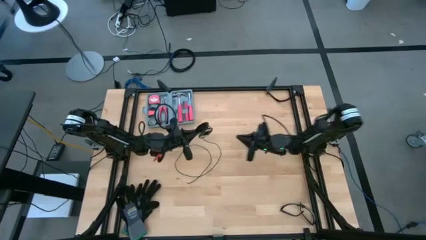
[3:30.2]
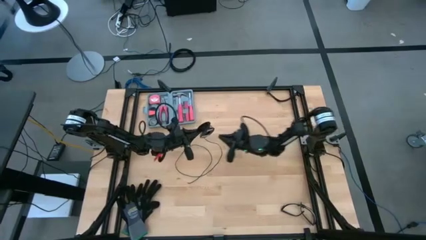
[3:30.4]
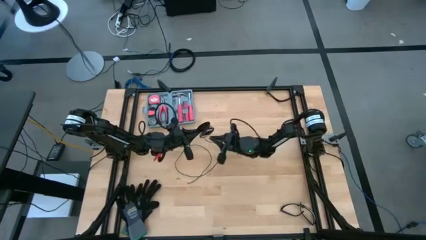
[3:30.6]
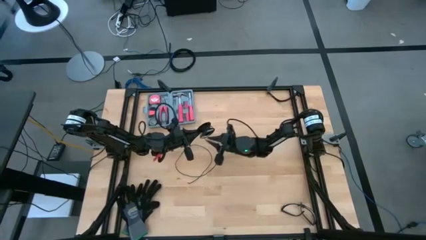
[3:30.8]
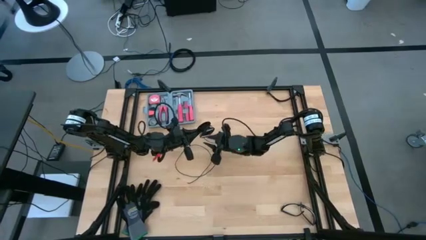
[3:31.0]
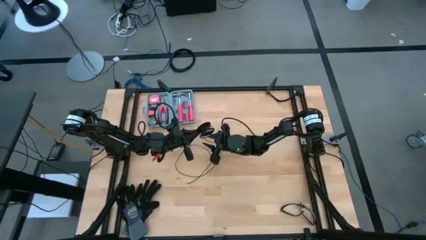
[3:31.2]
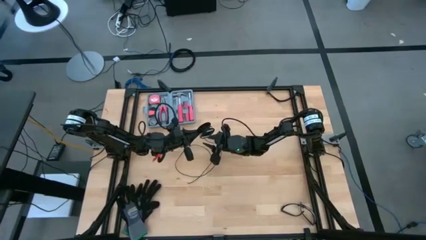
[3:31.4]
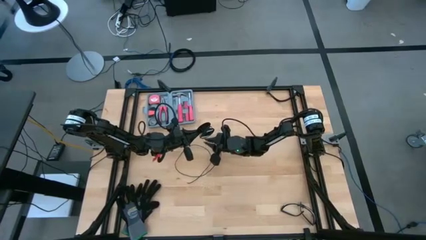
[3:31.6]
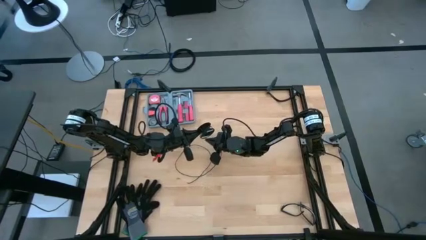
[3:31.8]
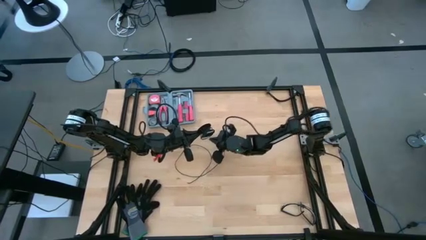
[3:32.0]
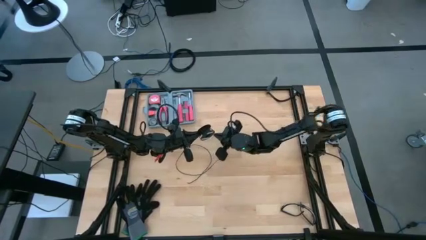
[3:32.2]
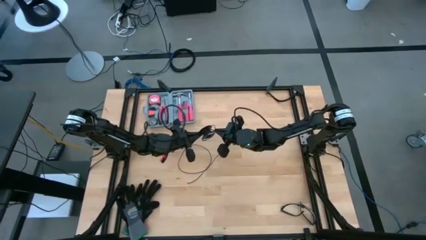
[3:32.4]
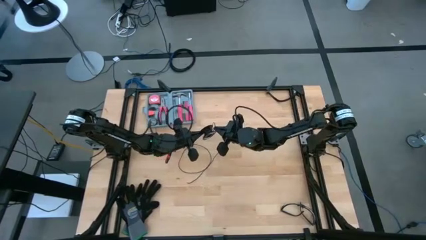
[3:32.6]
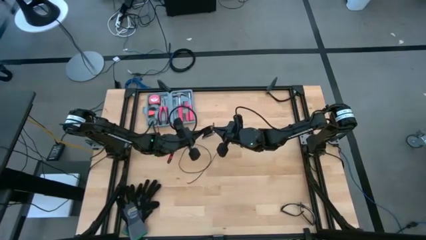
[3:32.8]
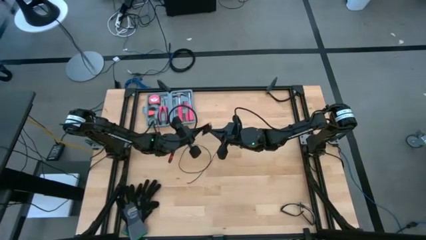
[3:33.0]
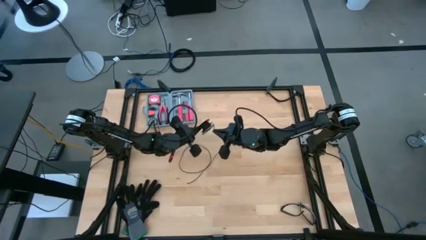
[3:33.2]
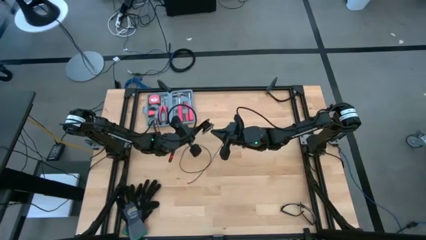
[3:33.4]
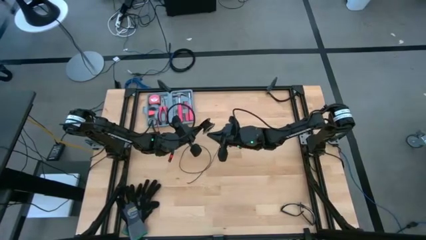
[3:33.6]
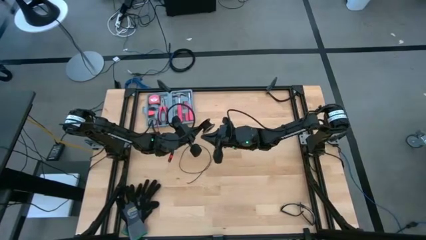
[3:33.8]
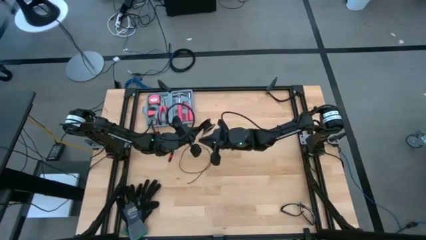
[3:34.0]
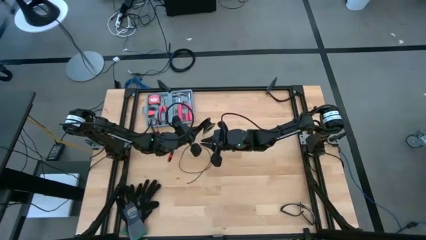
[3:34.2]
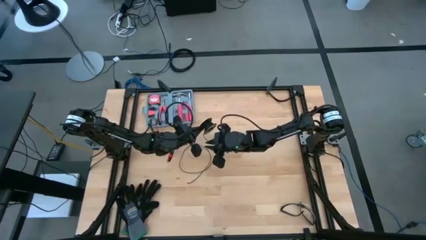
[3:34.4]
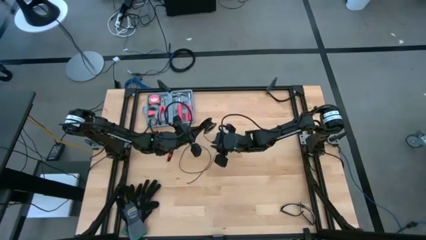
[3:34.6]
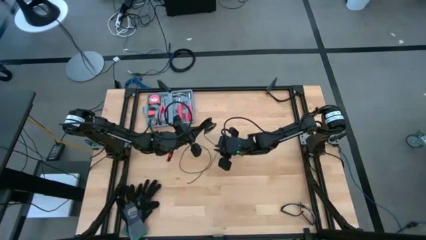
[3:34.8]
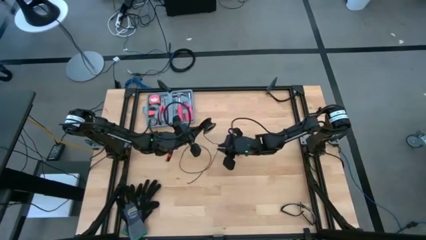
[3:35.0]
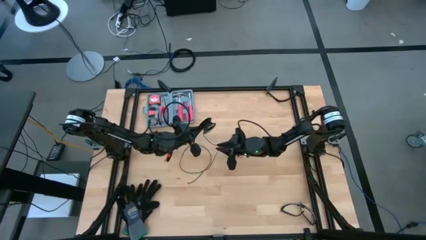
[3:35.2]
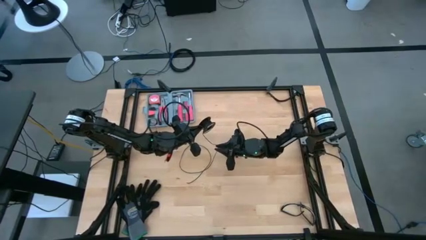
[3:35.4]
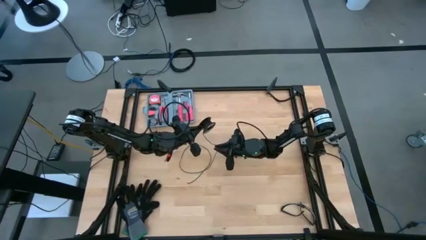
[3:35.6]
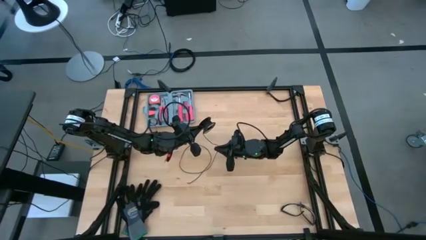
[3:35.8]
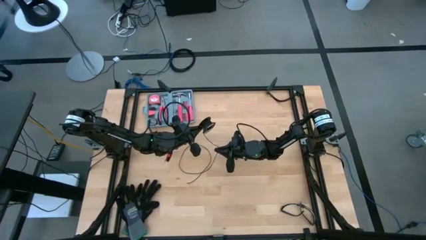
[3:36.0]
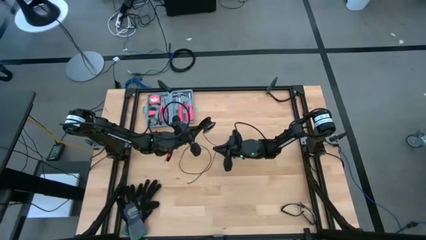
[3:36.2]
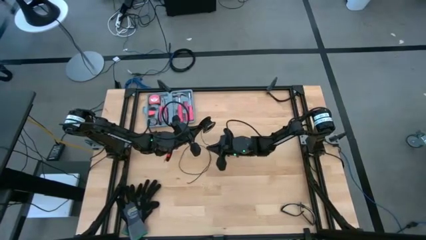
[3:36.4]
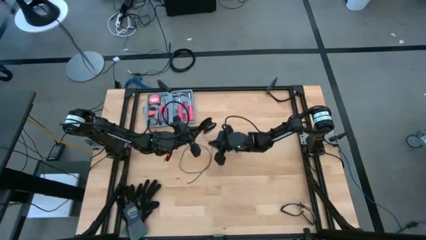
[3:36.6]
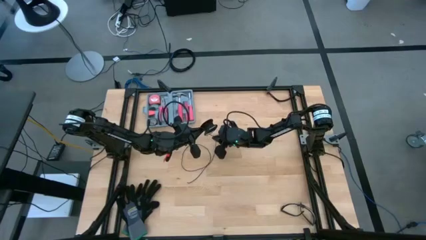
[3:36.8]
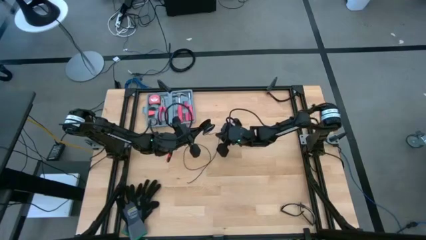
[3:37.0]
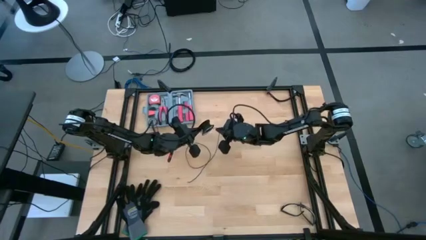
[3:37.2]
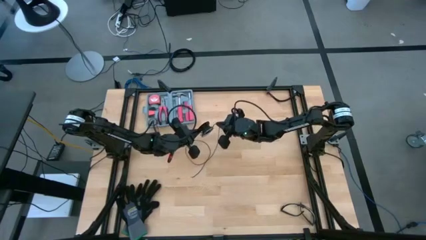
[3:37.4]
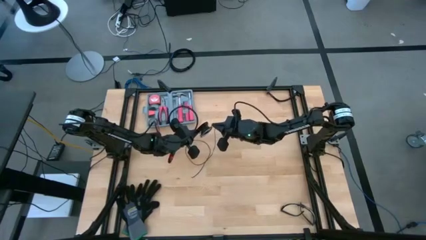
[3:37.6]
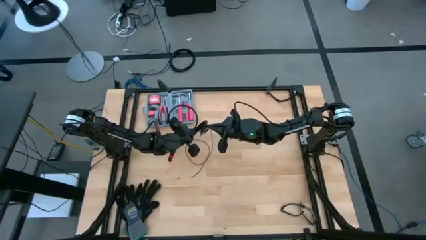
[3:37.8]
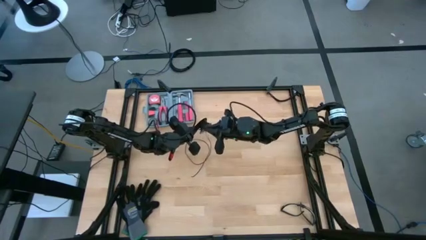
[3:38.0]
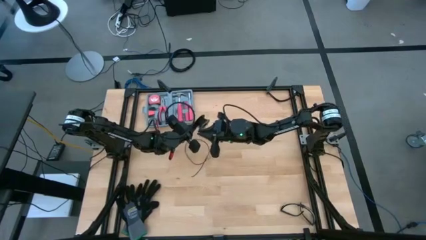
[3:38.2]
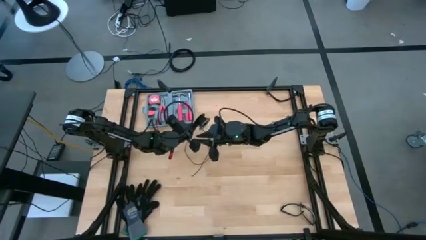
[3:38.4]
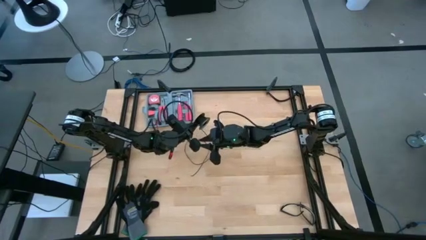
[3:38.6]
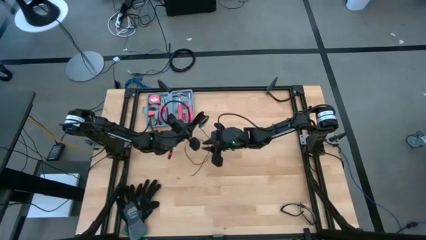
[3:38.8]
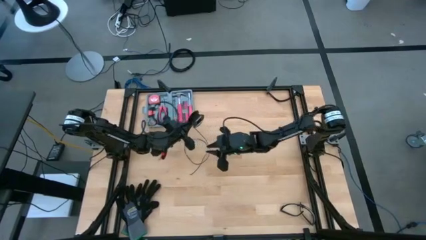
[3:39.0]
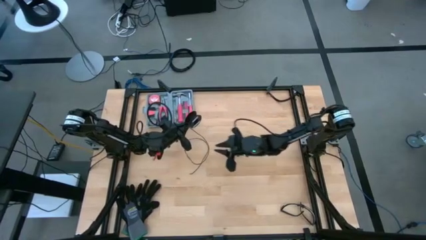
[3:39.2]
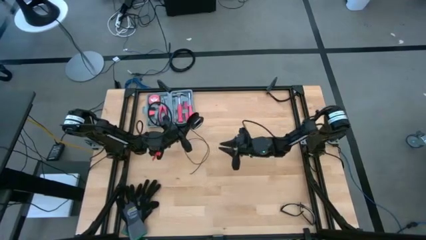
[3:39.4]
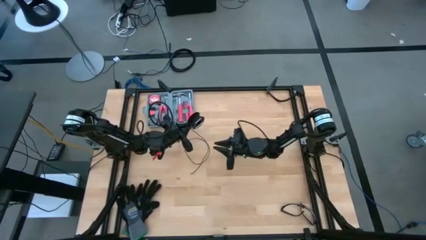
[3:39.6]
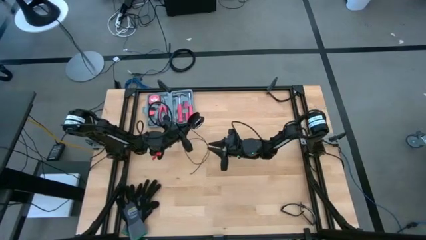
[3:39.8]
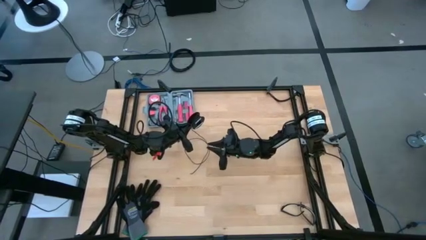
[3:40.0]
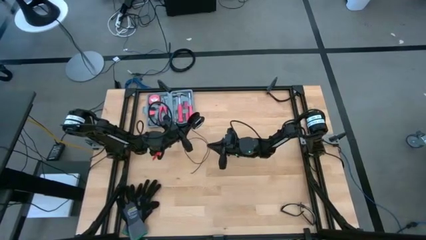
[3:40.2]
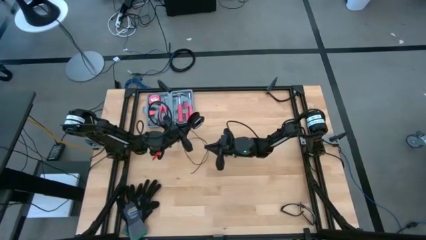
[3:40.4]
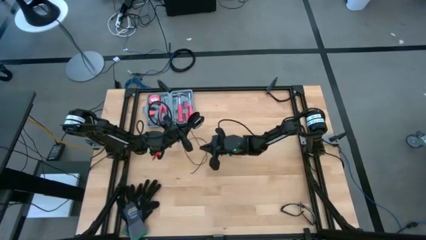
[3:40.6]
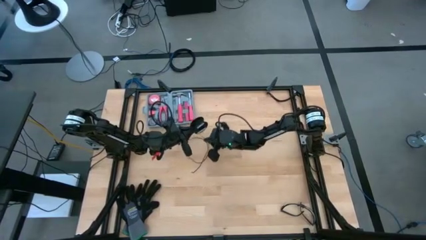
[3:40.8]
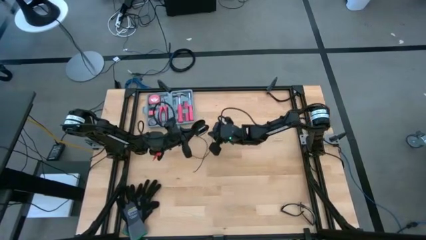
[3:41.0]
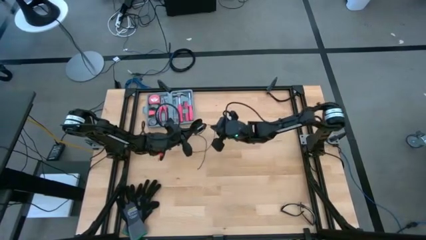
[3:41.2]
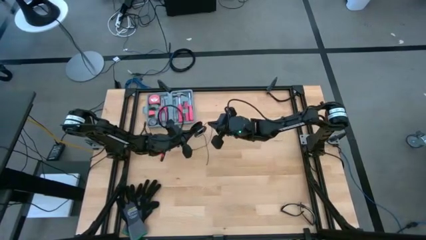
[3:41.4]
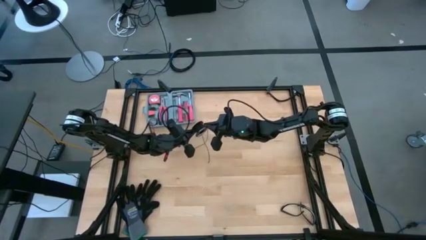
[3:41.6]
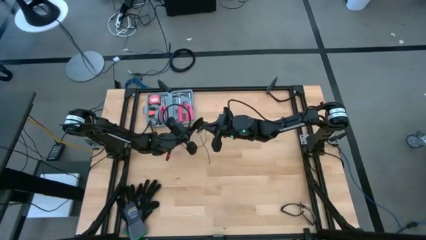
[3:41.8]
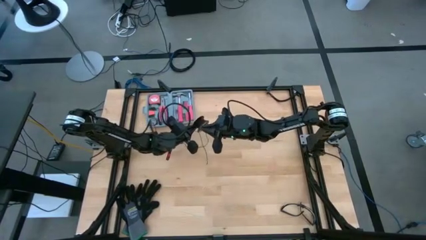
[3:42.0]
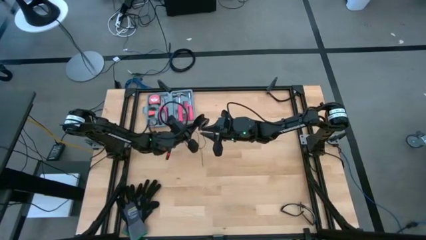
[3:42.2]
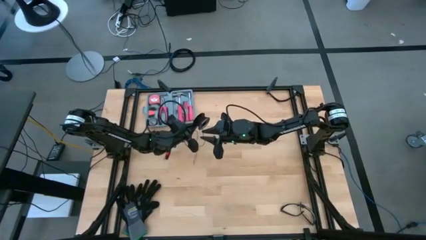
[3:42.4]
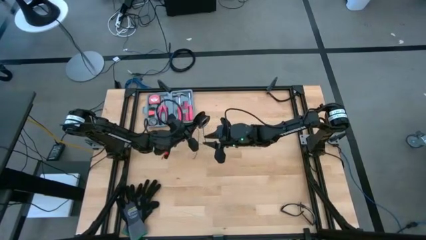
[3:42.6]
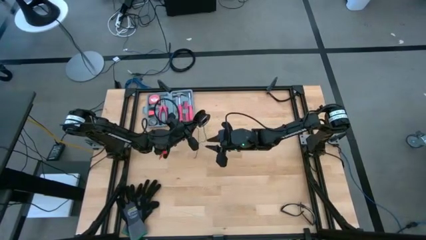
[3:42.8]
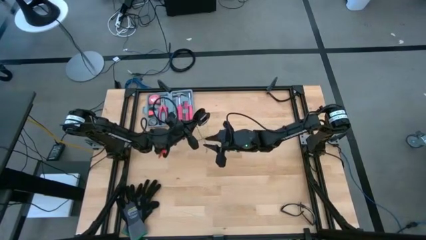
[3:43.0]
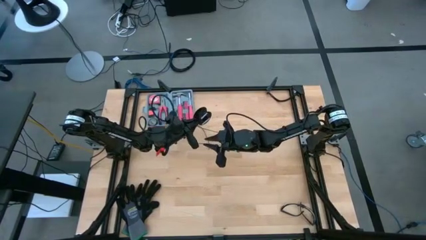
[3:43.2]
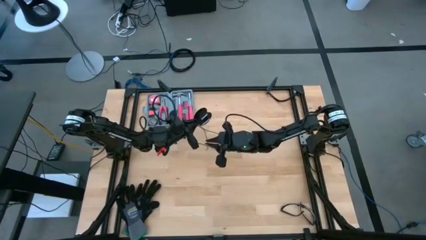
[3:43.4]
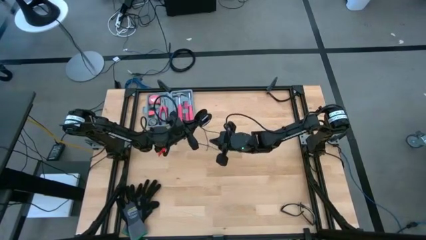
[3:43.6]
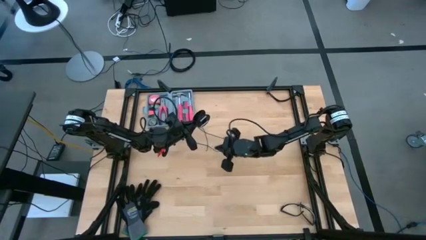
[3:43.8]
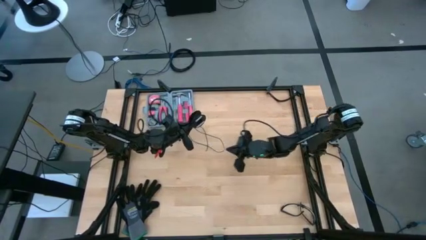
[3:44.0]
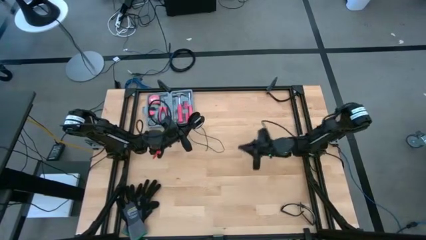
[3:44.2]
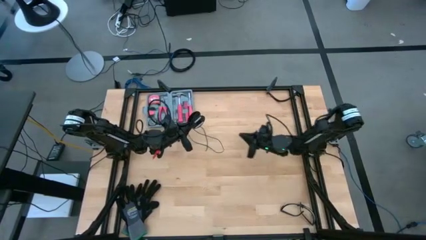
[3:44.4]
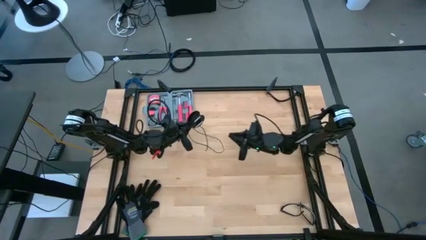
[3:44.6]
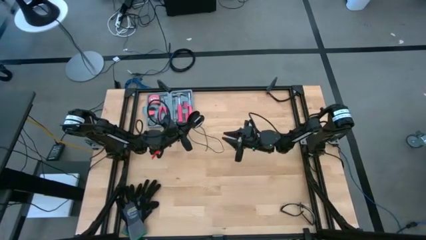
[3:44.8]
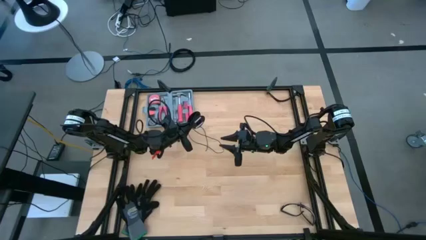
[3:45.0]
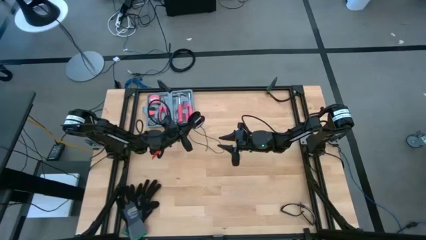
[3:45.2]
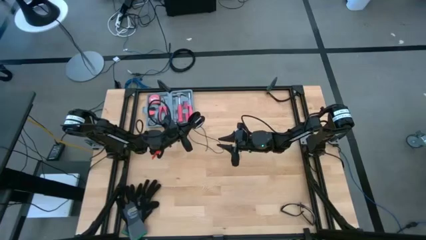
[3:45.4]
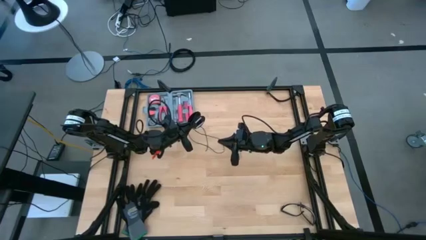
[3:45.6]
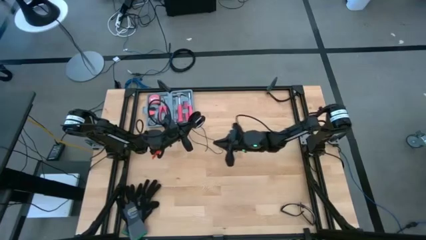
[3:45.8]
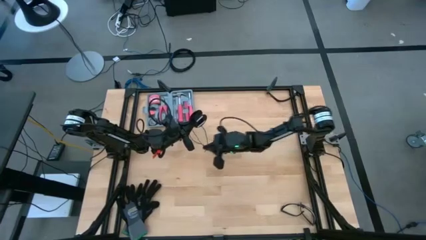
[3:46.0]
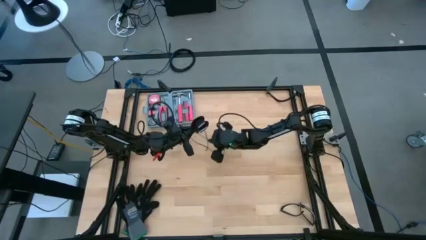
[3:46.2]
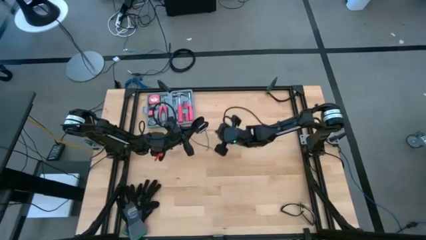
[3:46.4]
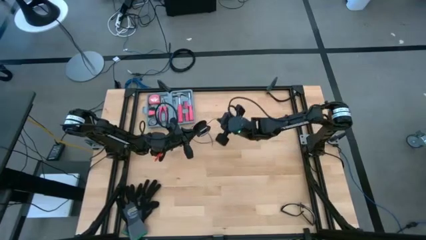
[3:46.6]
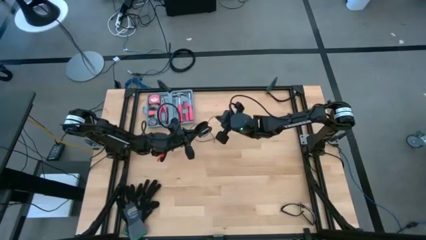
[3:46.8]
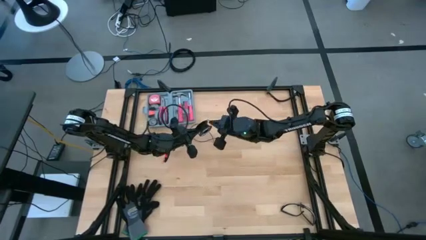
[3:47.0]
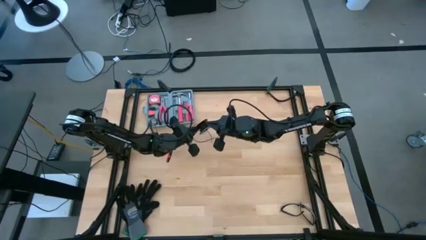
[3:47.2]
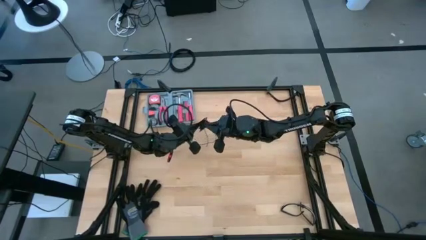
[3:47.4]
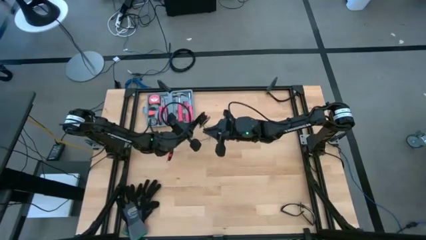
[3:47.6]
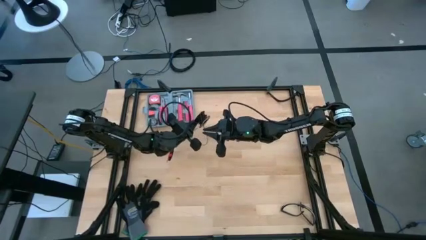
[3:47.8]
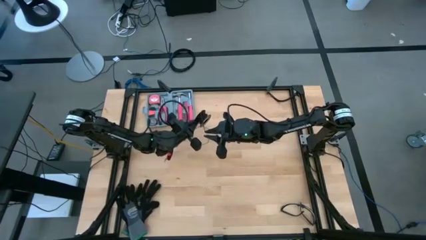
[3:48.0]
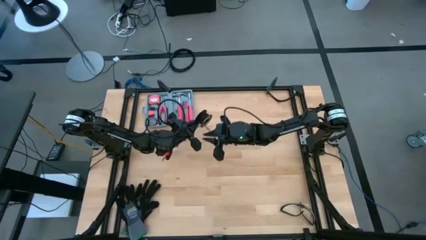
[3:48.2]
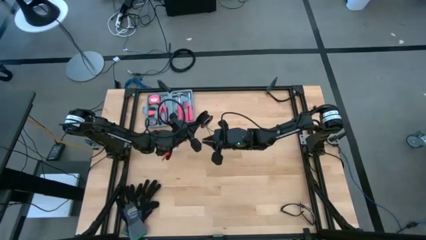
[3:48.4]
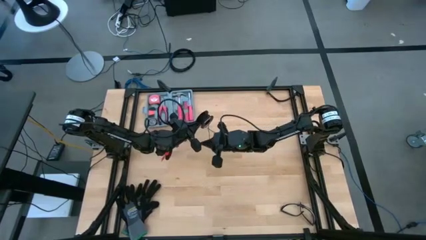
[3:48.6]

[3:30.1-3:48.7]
Task: Coil cords
Coil the black wire onto the spool
